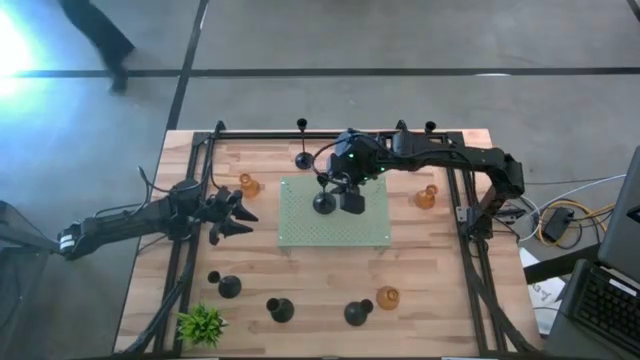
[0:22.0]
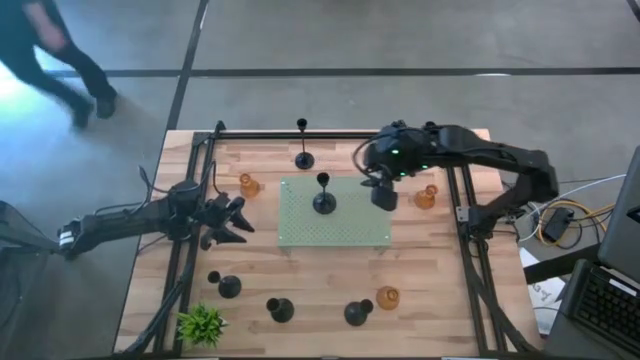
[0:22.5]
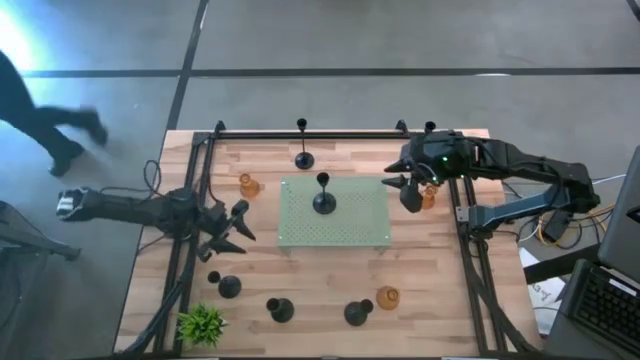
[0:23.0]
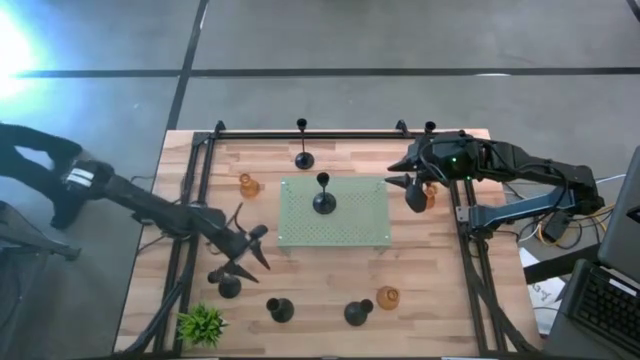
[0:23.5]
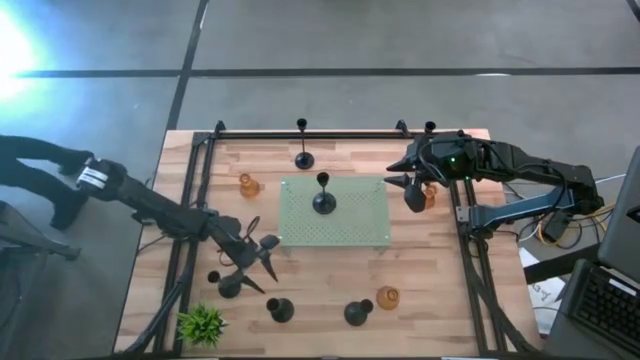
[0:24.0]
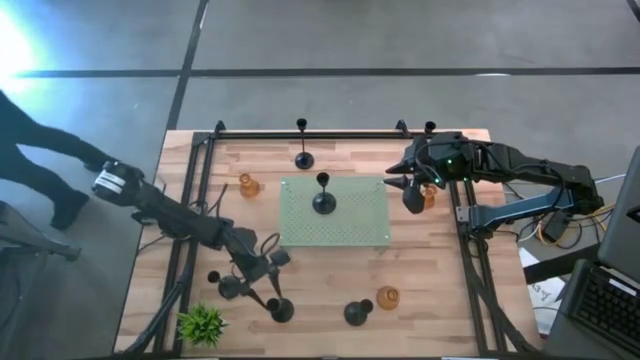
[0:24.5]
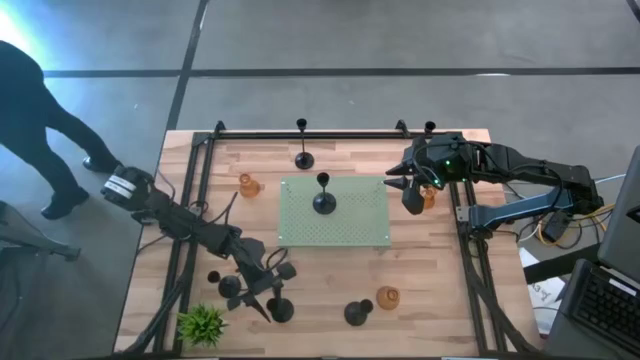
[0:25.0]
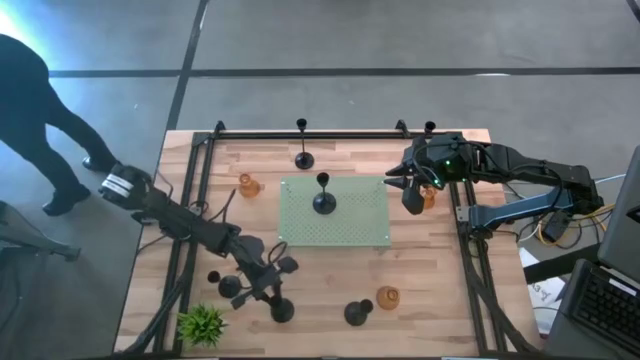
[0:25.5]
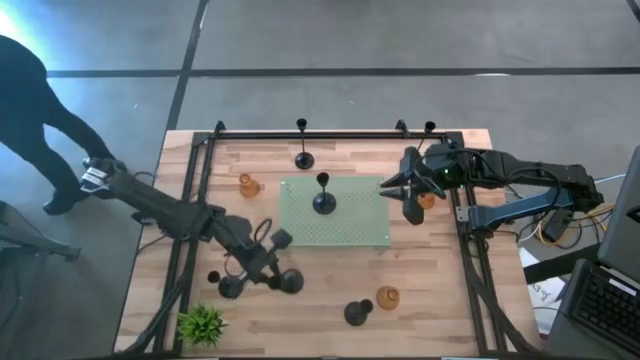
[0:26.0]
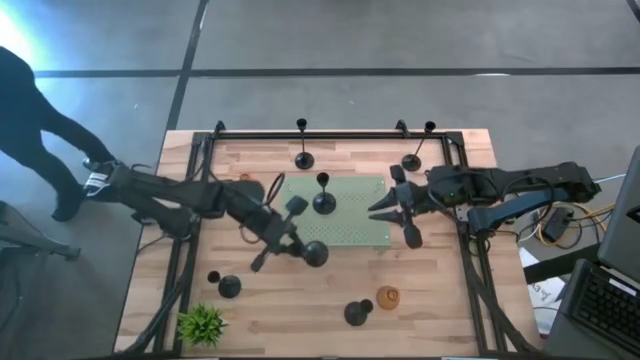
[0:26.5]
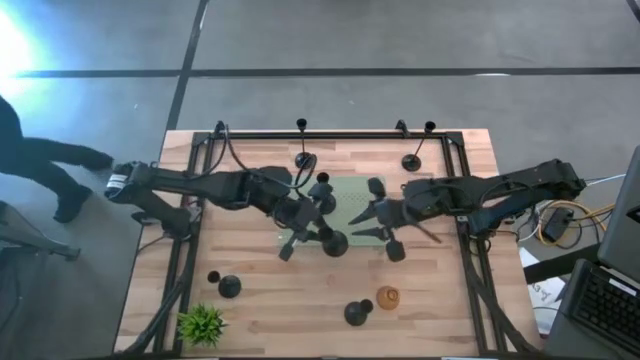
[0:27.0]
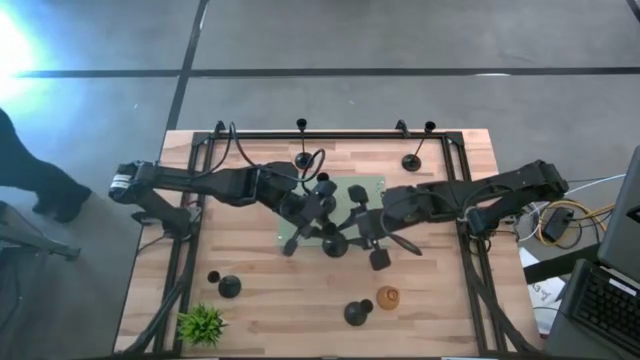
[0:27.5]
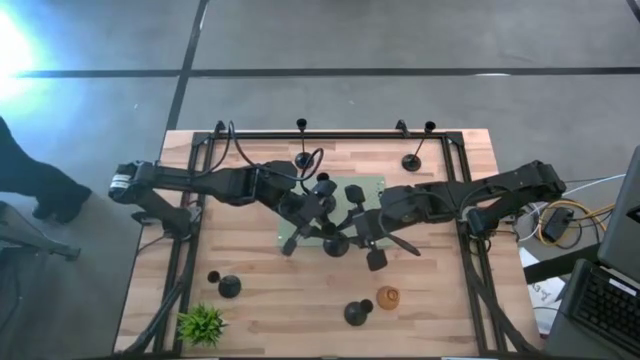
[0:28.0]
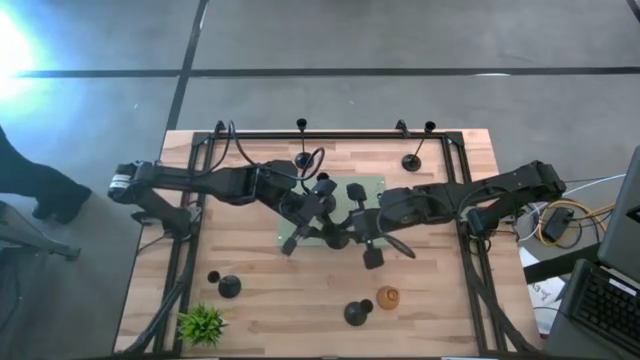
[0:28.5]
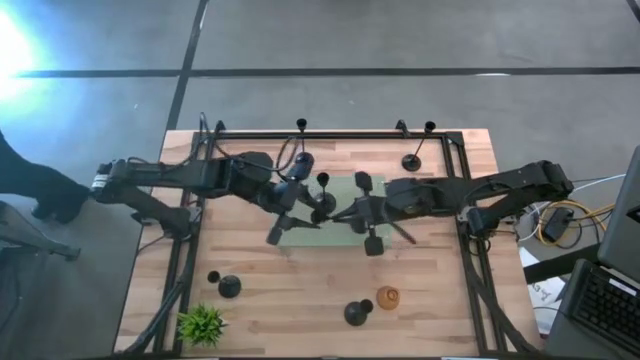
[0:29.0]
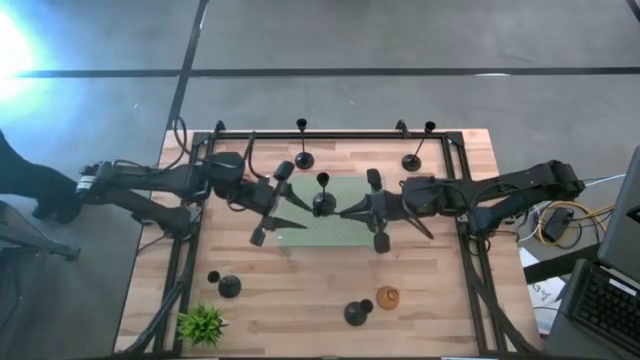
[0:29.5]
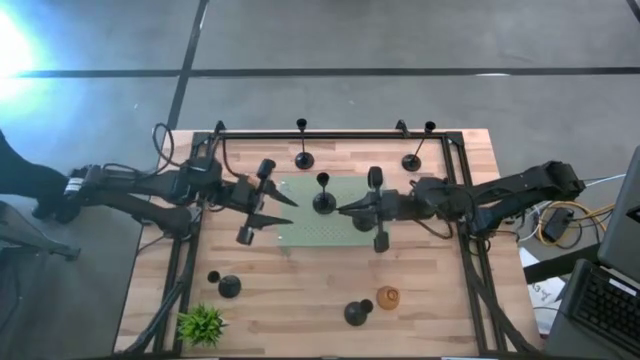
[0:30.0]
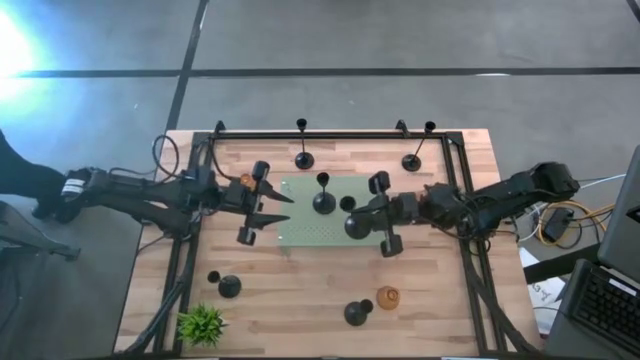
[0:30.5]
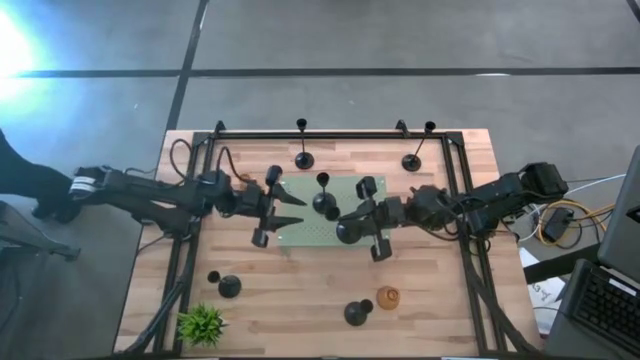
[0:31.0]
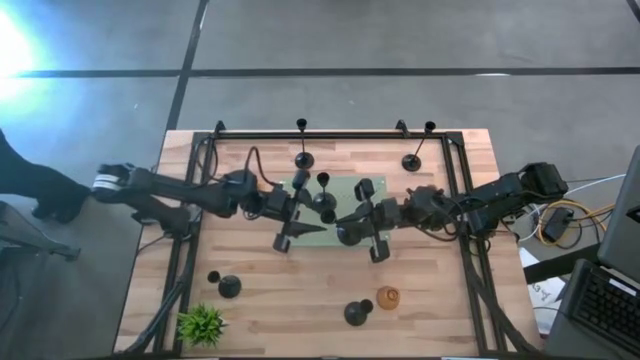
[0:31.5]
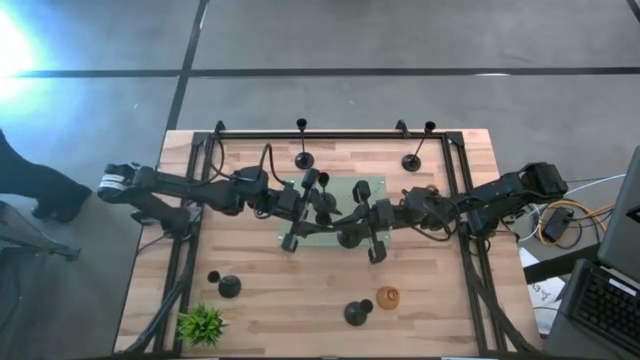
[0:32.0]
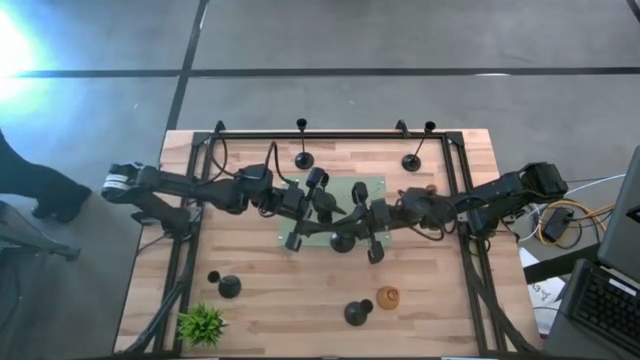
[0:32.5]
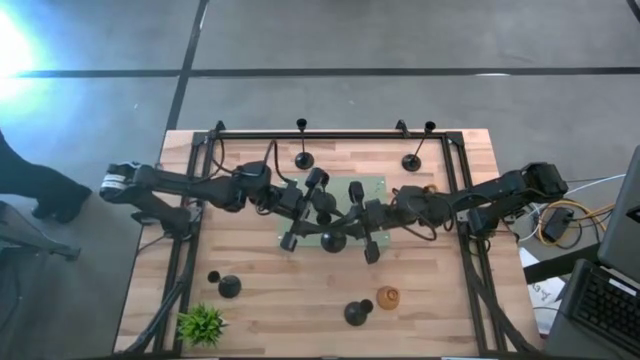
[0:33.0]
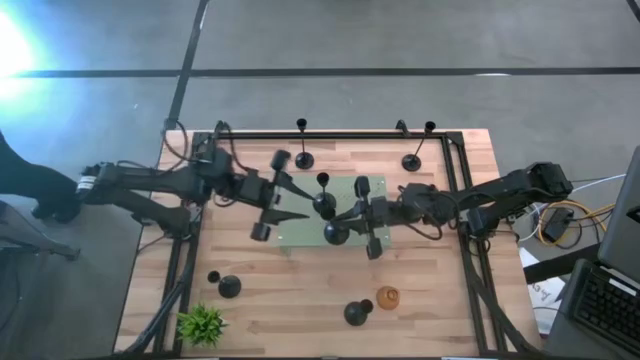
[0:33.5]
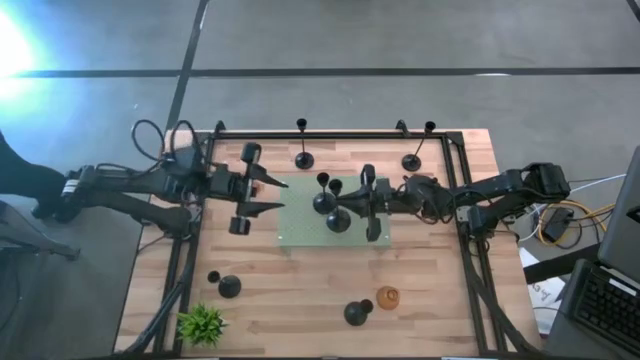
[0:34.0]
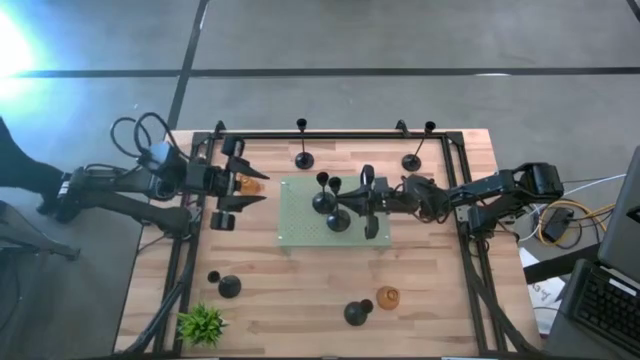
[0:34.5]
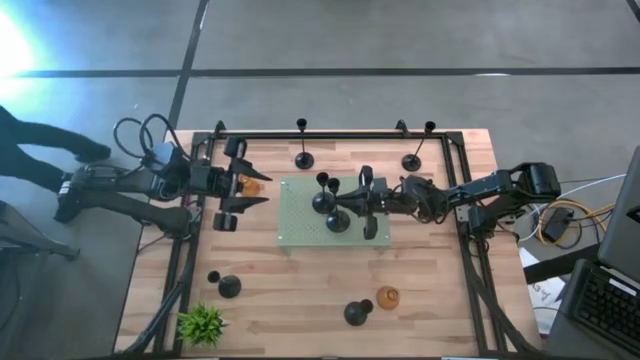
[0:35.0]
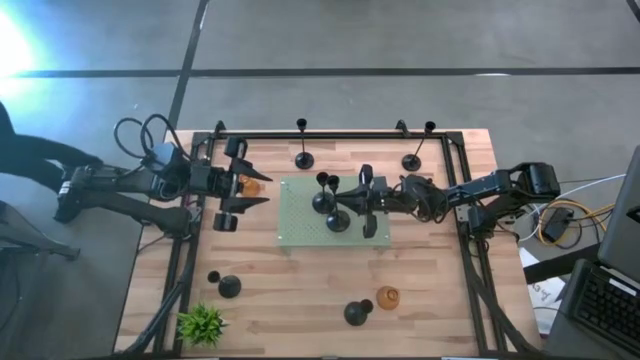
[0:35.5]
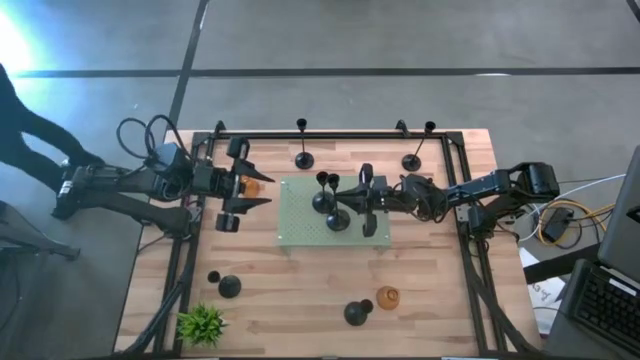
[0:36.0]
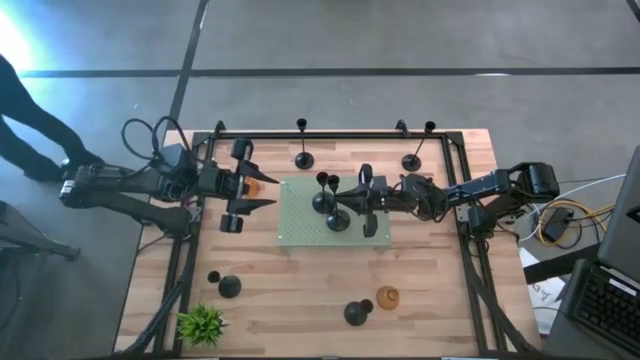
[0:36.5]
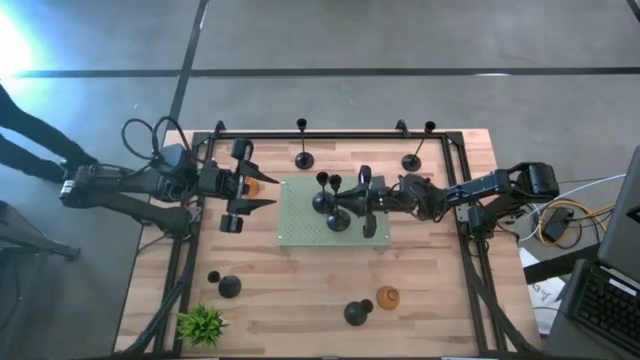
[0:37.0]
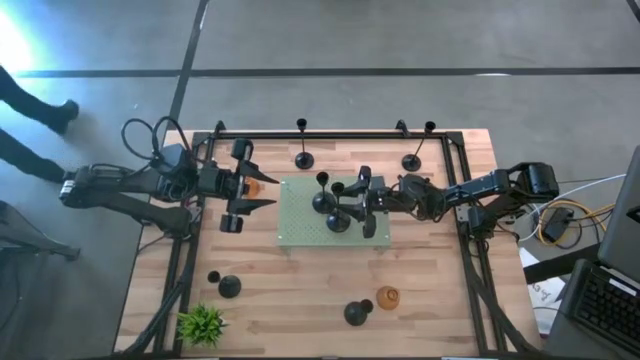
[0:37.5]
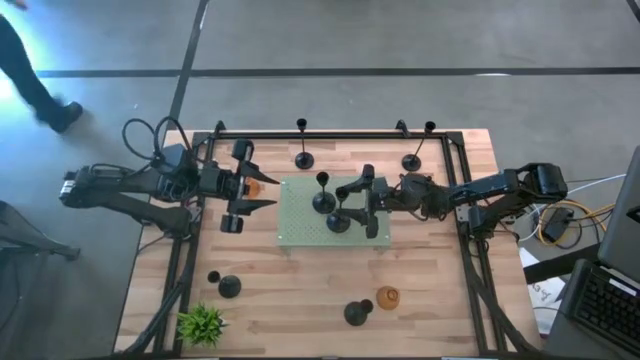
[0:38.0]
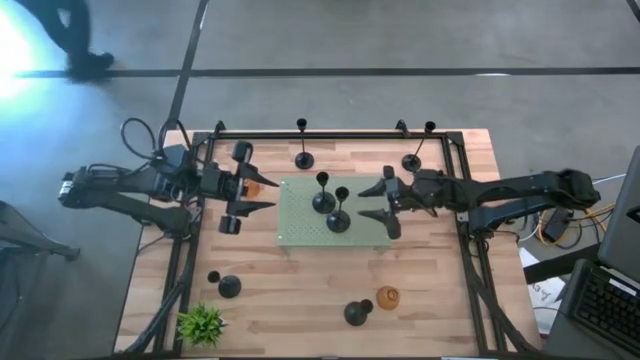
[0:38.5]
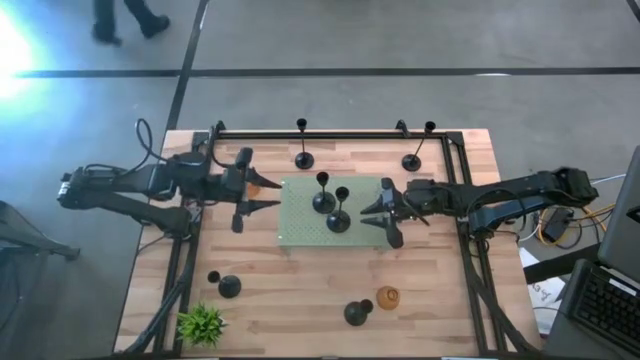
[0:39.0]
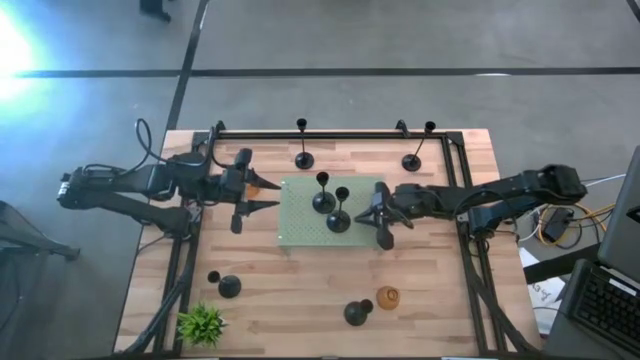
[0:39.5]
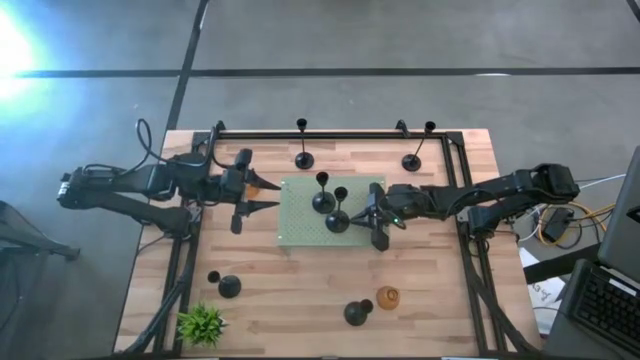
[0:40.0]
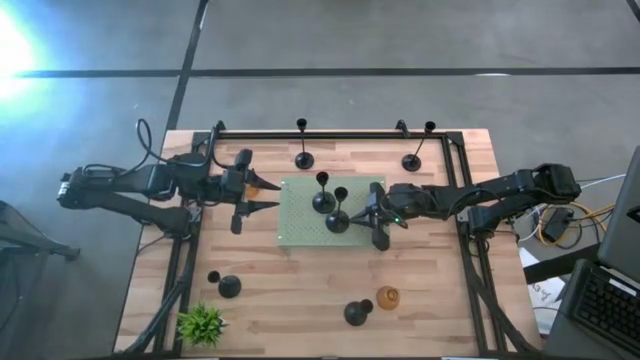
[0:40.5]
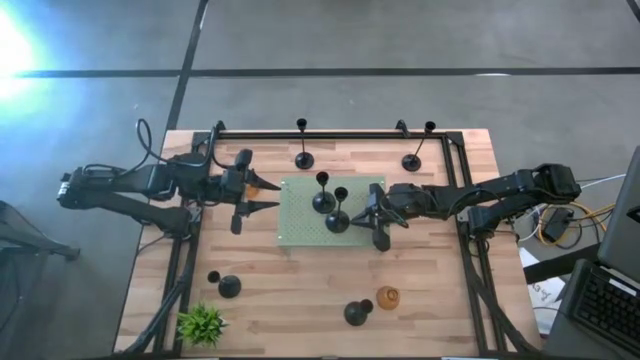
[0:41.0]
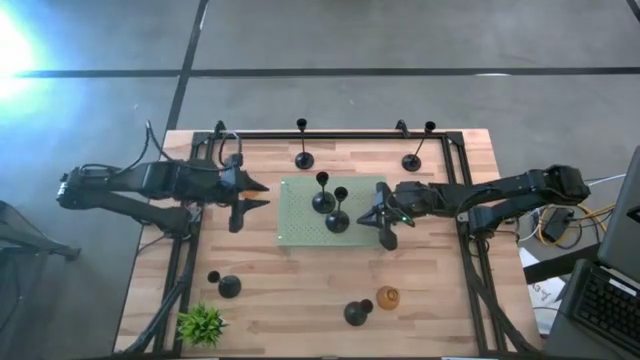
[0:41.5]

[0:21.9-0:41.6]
Task: Pick & Place candle stick holders
Put the black candle holder on the shelf

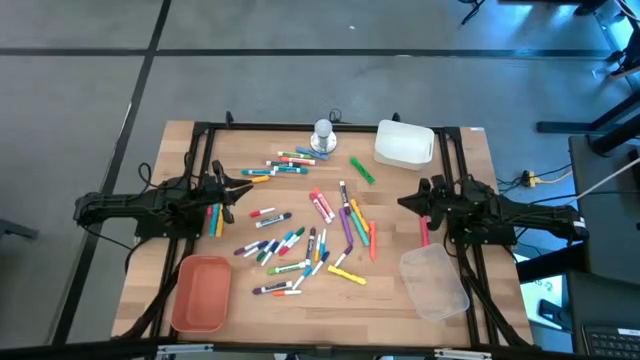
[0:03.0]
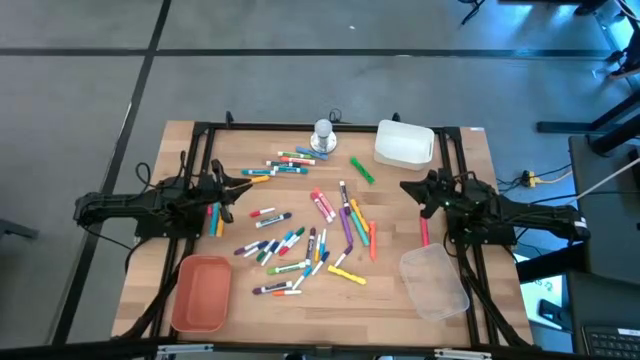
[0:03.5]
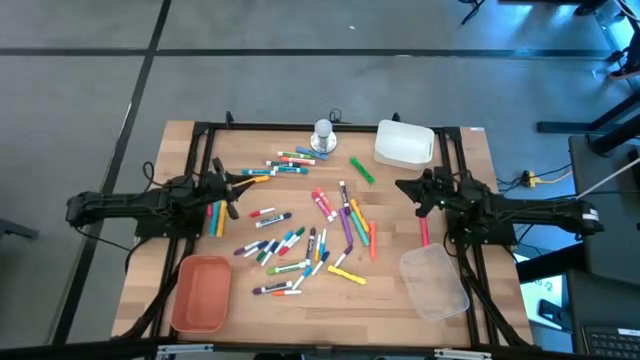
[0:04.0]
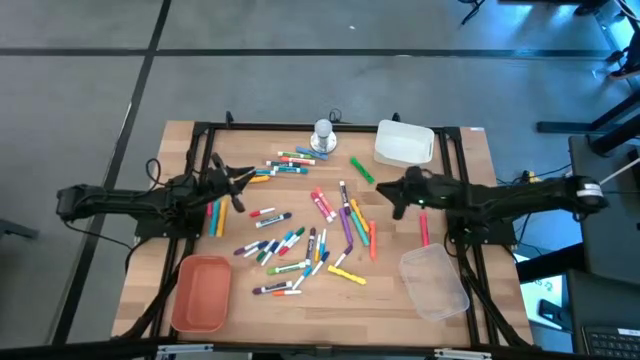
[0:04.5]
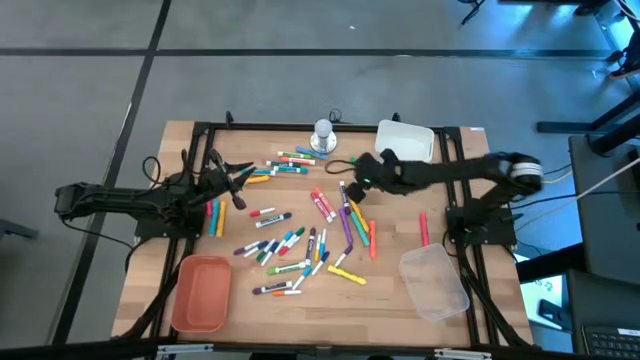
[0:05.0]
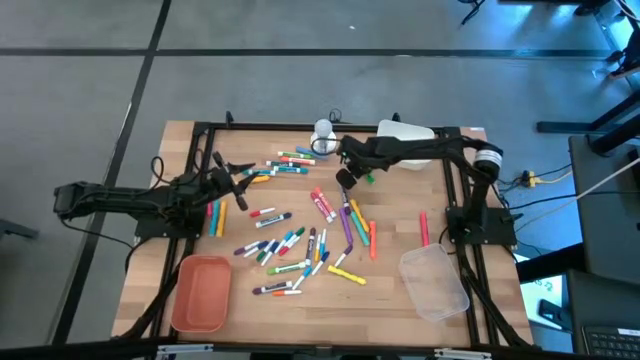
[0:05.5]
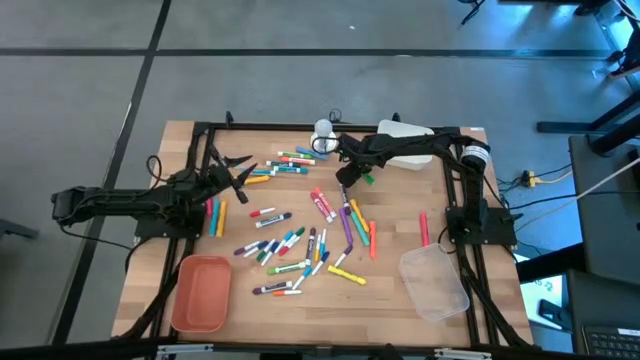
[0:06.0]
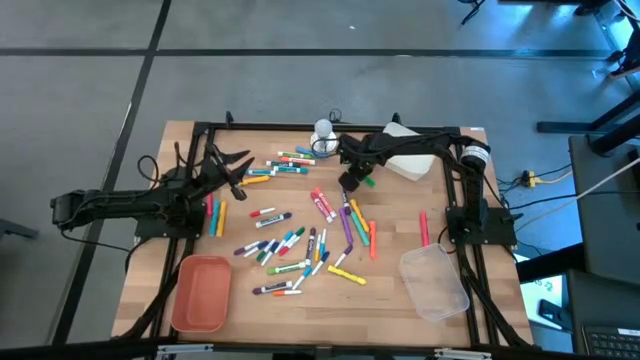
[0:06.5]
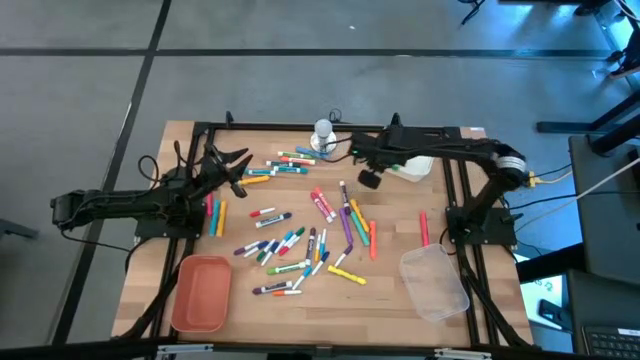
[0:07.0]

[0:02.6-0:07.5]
Task: Pick & Place Markers
Put the large green highlighter pen into the white bin
